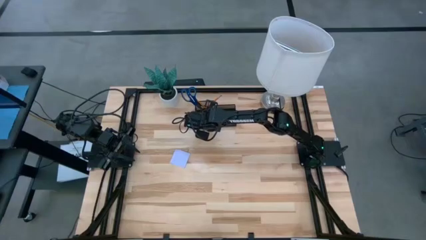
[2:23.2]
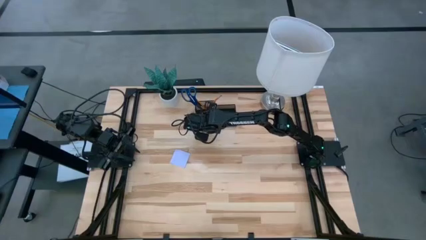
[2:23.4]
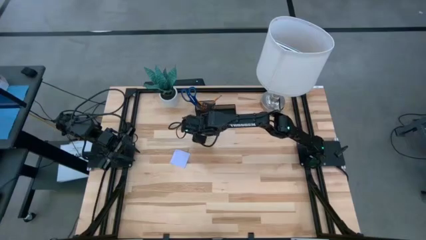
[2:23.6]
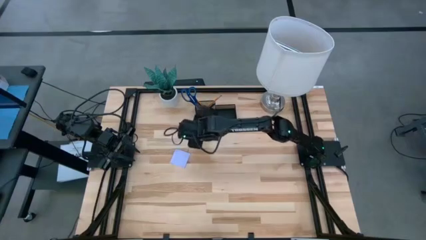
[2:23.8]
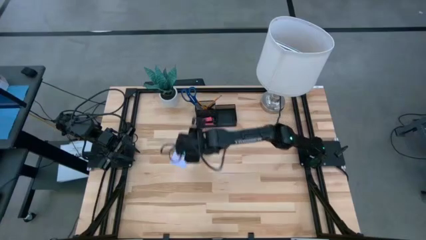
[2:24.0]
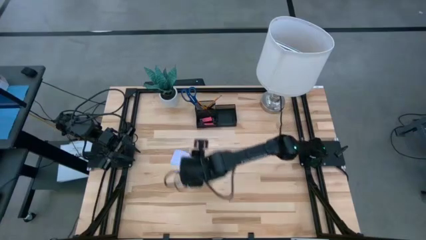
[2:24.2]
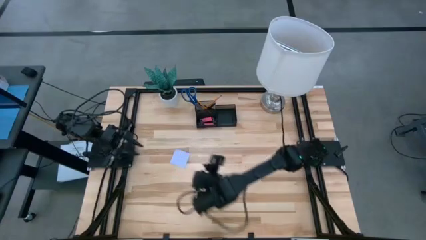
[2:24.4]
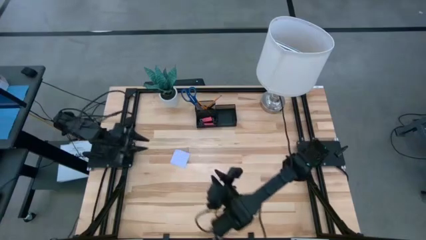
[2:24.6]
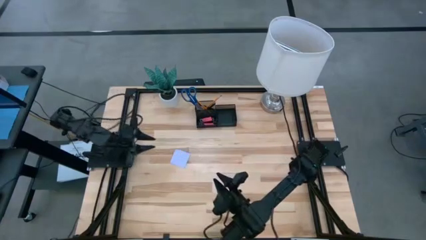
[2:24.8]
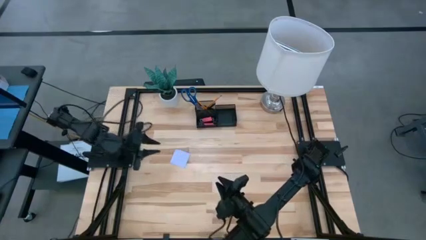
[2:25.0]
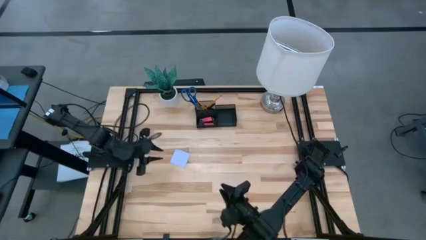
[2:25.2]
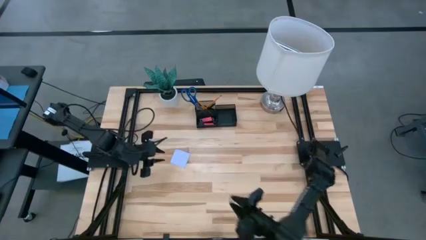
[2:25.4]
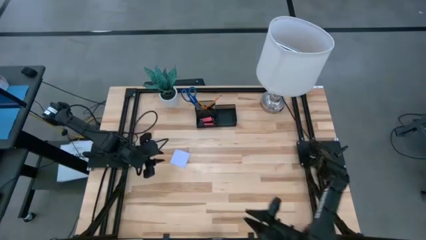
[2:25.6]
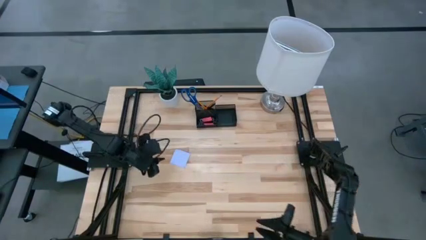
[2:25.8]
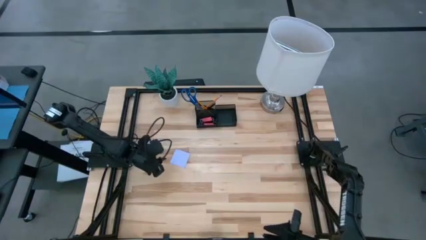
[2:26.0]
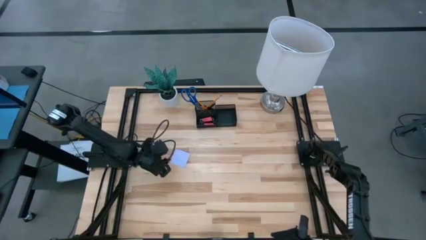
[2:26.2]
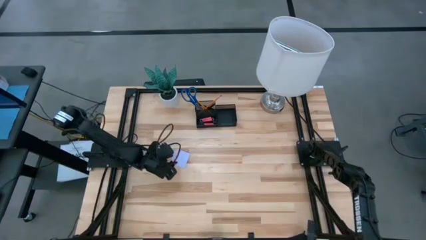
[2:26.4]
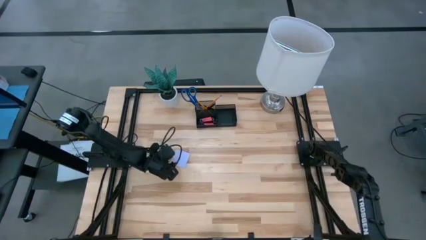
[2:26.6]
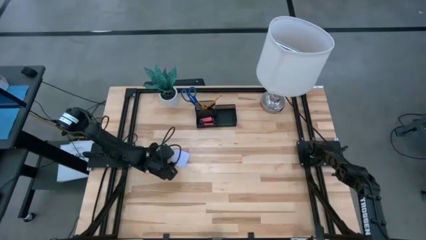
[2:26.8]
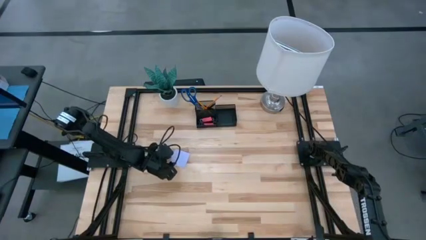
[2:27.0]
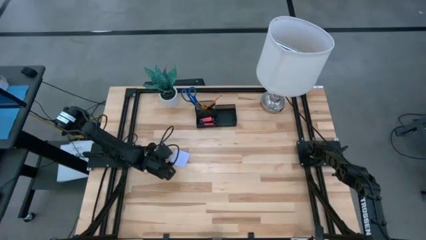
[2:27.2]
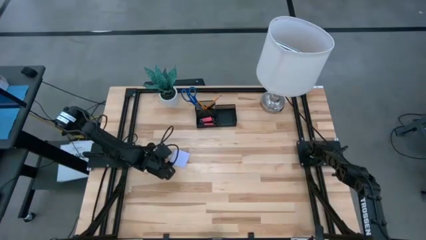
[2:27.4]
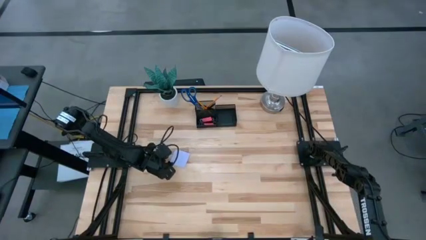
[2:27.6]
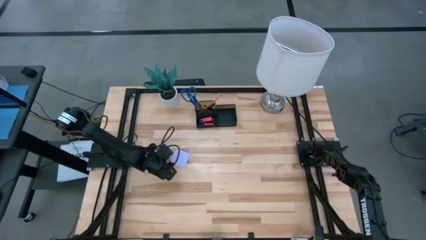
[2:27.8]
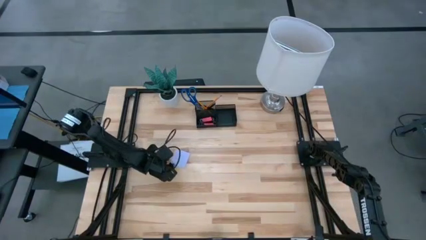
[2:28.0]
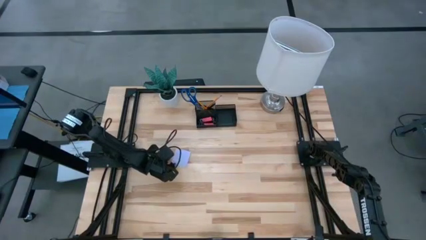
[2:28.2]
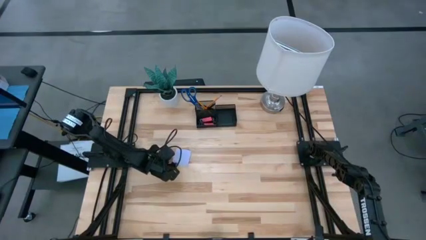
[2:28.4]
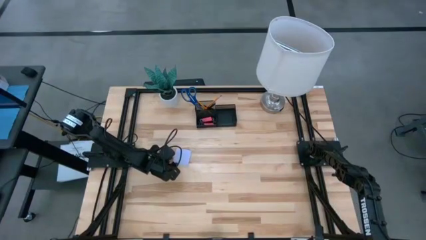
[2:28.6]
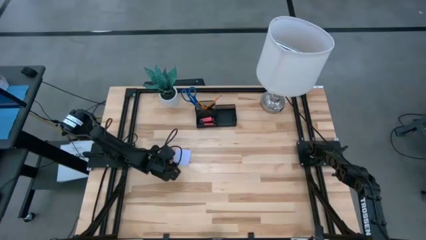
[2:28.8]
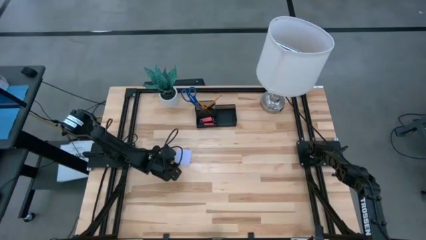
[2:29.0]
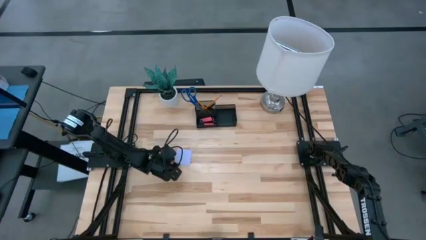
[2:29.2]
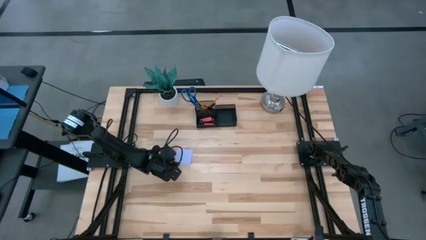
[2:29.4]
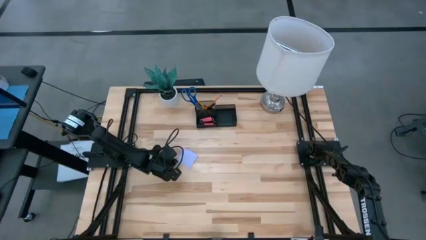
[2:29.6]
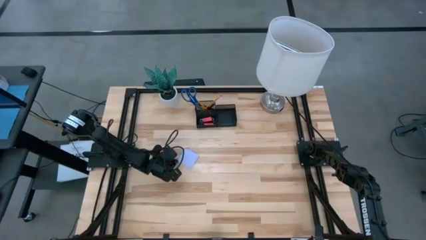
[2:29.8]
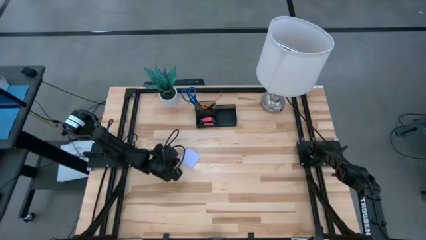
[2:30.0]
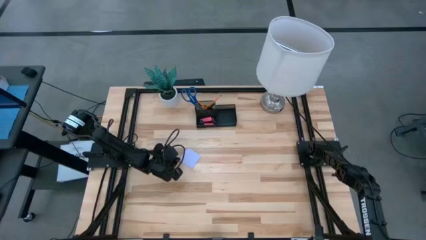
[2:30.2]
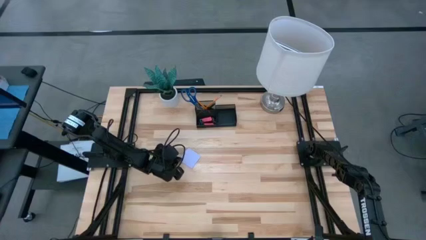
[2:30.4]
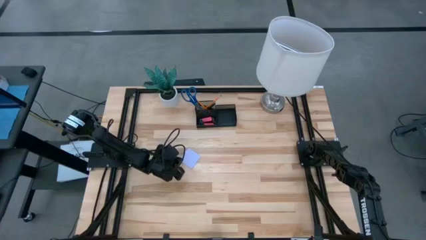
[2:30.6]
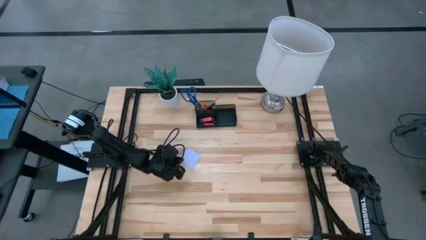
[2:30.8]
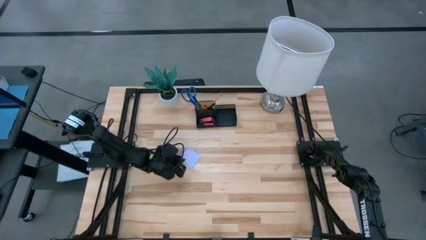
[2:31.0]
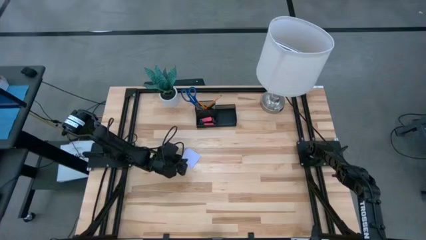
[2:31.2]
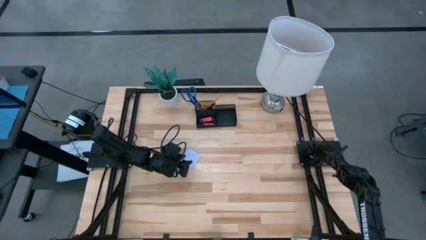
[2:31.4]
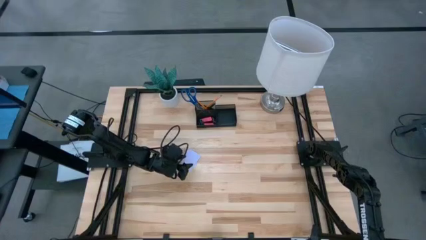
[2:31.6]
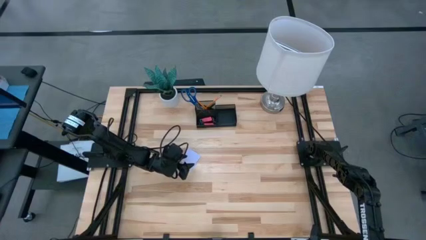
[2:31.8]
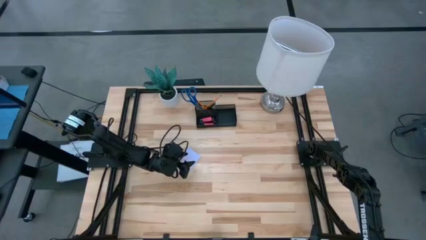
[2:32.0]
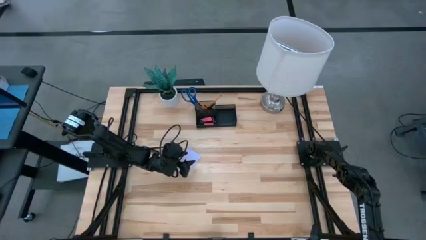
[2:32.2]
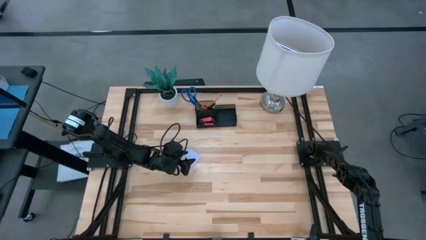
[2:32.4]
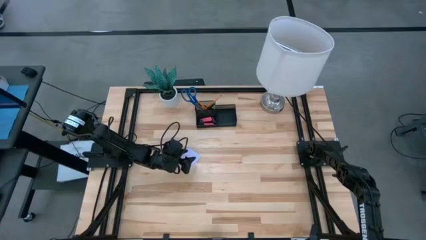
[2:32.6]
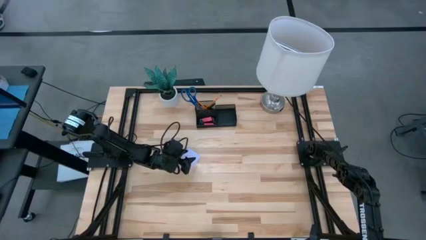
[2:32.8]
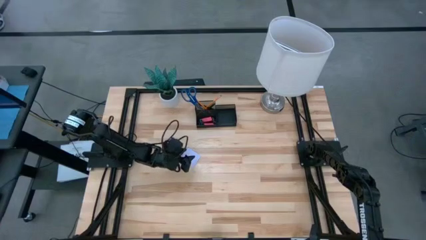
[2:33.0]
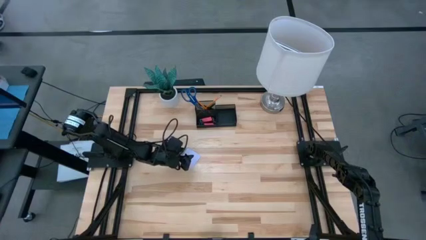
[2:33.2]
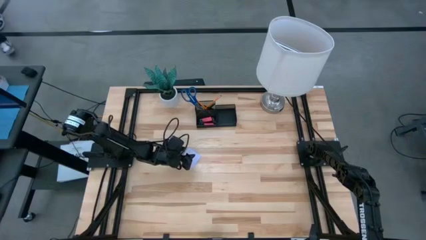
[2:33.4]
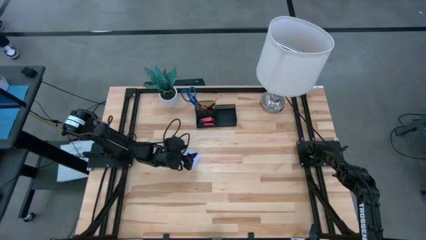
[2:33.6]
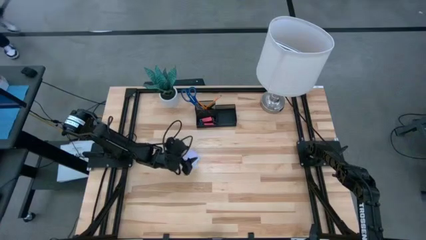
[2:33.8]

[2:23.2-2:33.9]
Task: Pick and place office supplies into organizer
Put the white sticky notes into the desk organizer

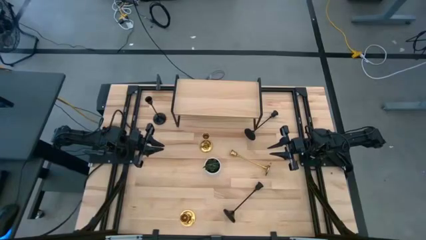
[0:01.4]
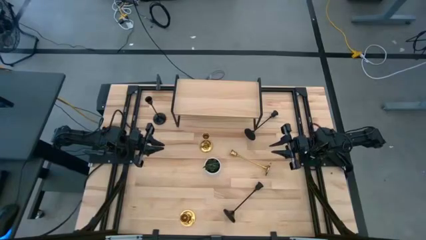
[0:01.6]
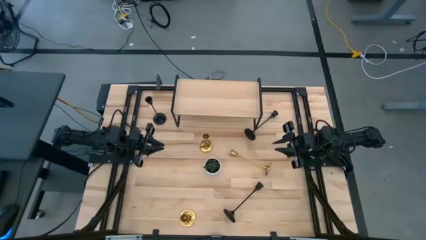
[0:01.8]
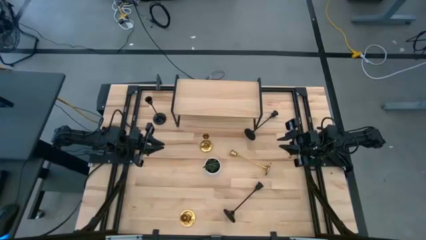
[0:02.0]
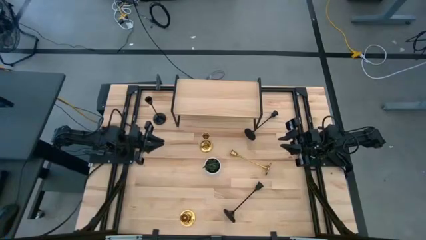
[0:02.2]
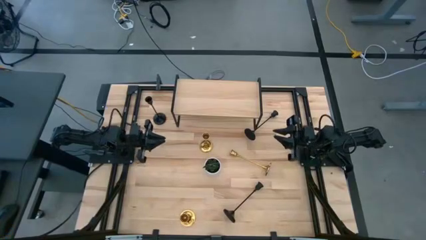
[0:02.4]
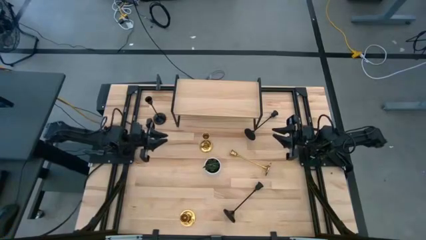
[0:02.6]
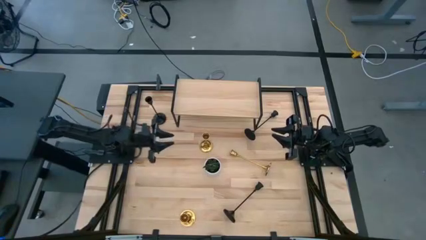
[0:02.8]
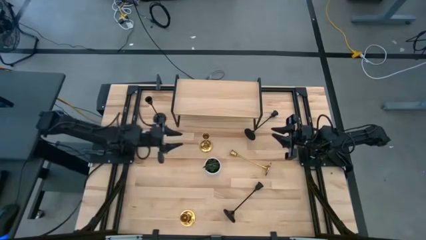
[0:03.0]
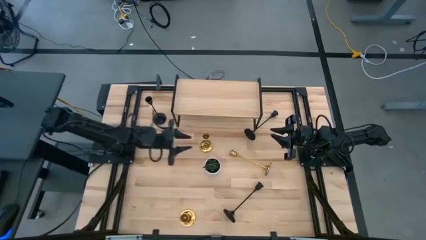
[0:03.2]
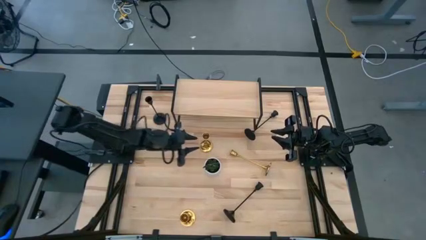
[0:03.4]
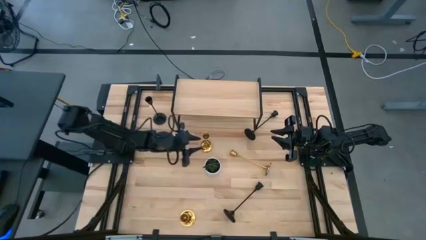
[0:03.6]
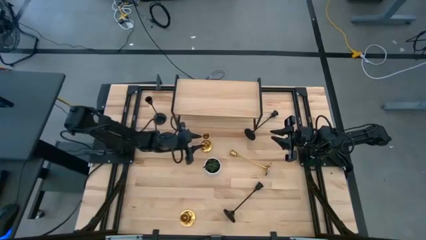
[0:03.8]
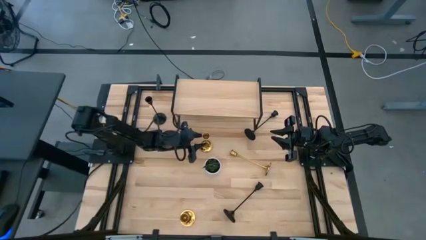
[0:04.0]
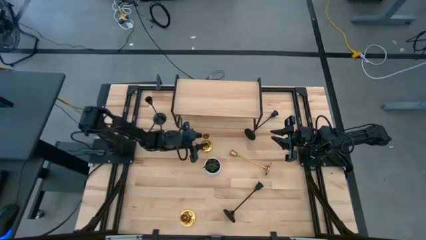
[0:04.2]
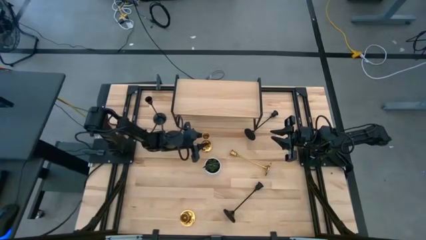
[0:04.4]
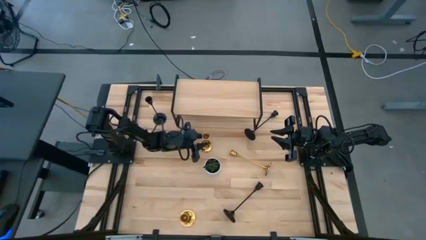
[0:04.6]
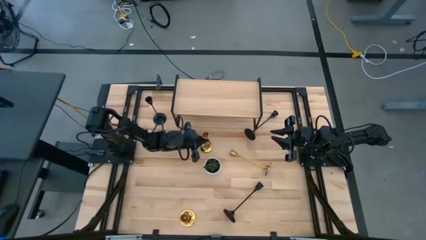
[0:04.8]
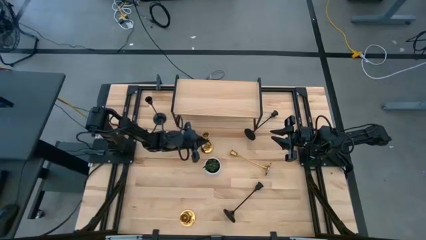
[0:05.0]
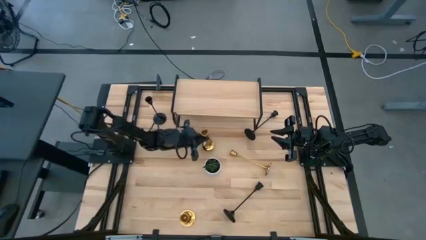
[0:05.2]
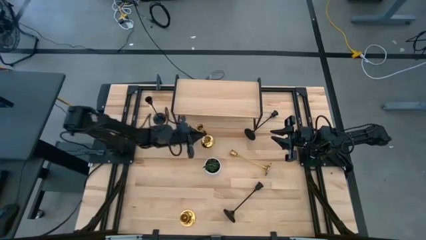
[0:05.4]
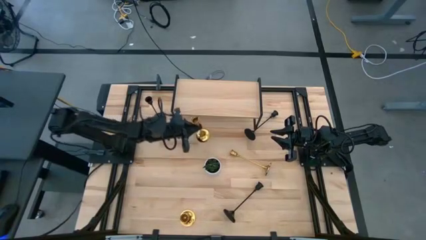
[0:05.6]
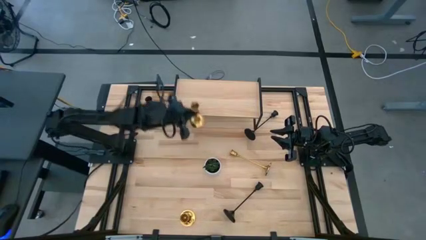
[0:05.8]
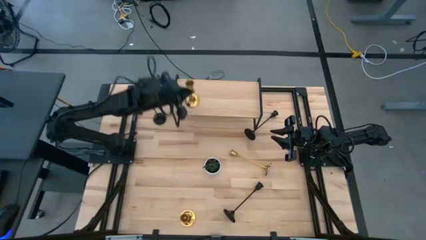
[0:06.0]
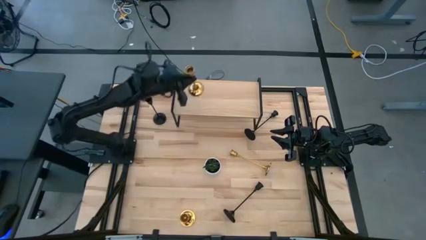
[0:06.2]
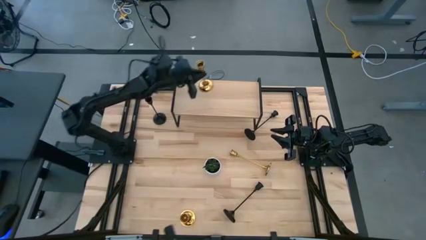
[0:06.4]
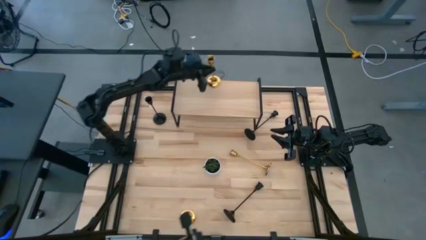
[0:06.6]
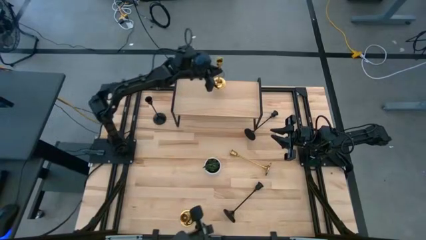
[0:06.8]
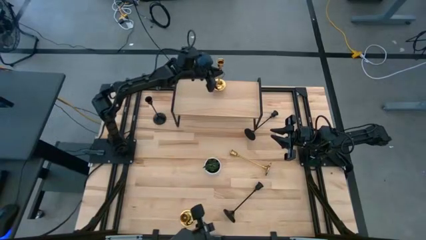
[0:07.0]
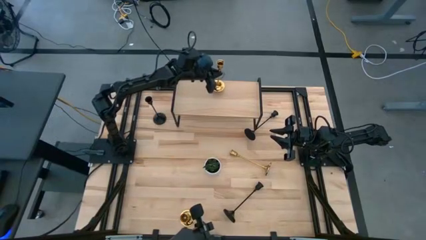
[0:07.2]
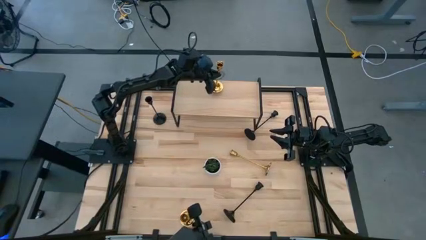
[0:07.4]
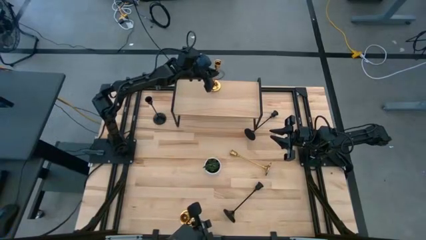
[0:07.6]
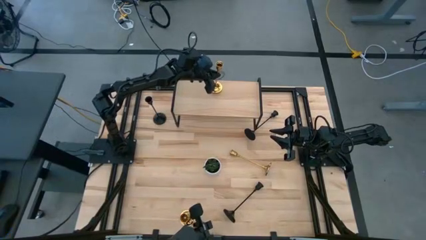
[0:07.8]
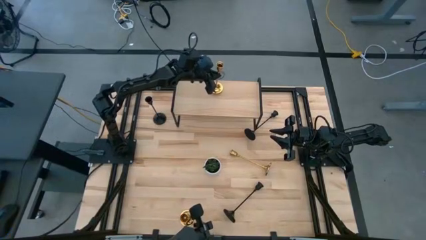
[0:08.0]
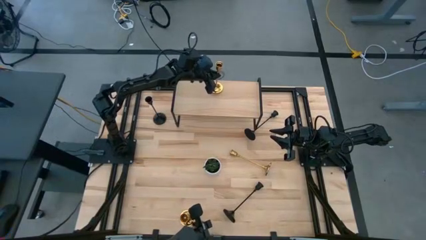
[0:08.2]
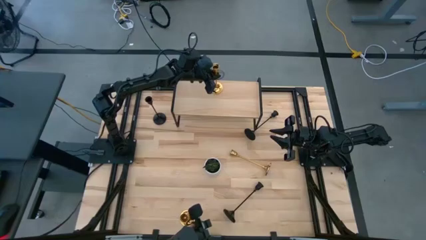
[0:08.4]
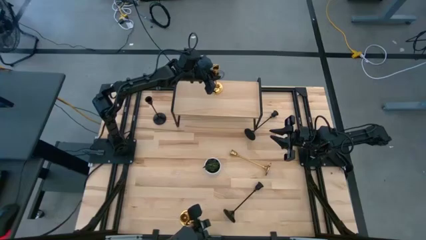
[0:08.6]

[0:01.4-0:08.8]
Task: Pick & Place candle stick holders
Put the top left gold candle holder on the shelf
